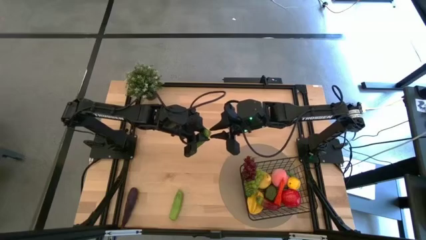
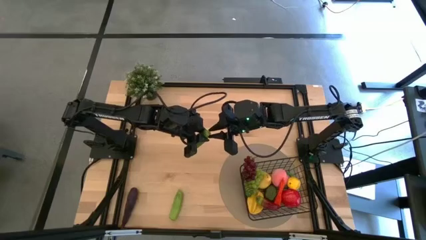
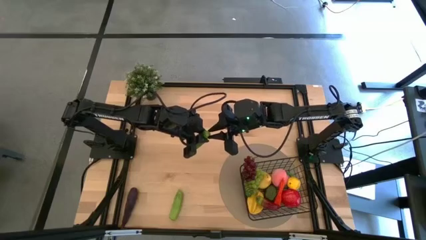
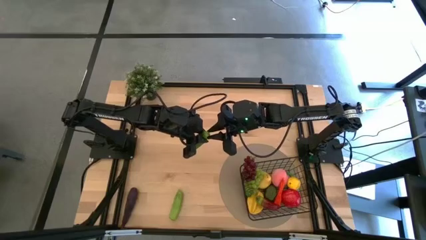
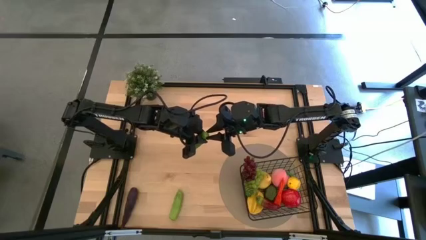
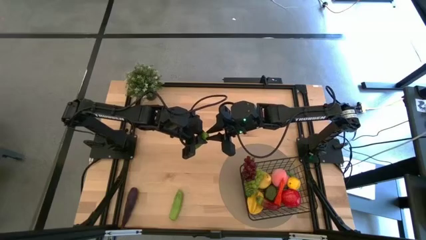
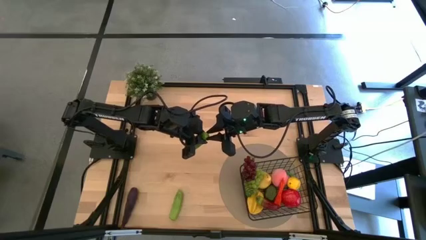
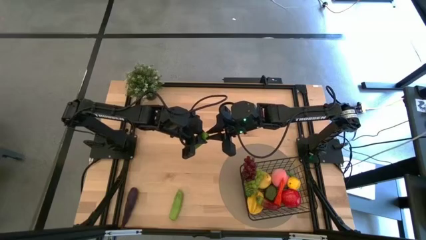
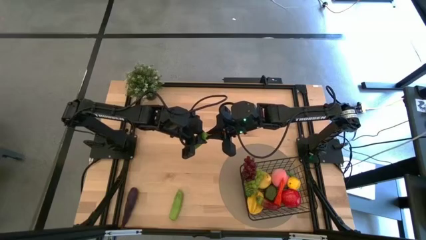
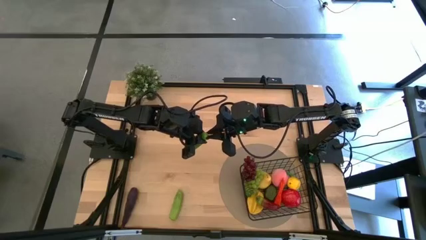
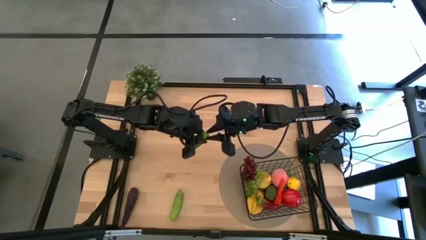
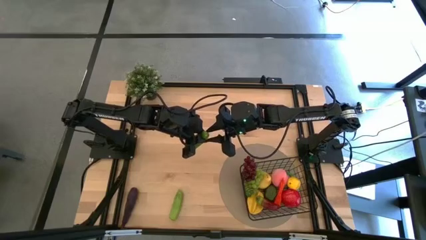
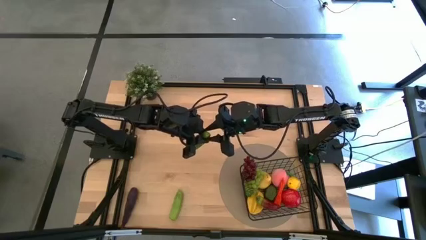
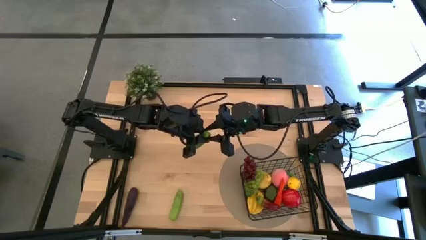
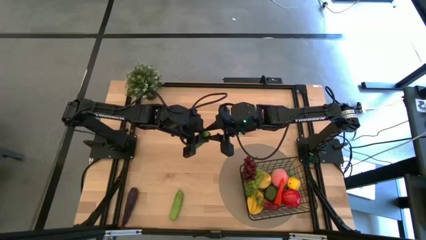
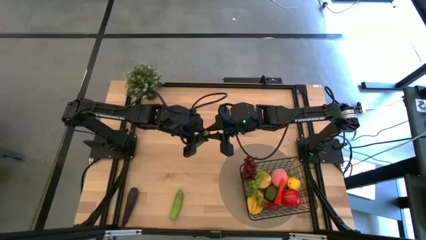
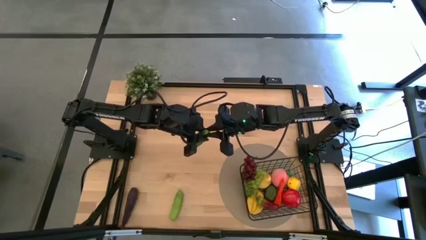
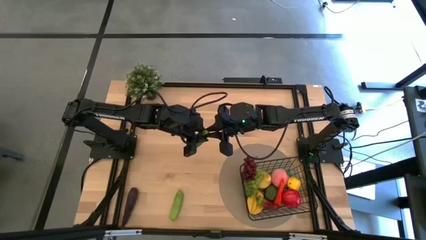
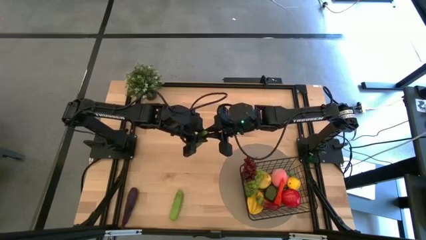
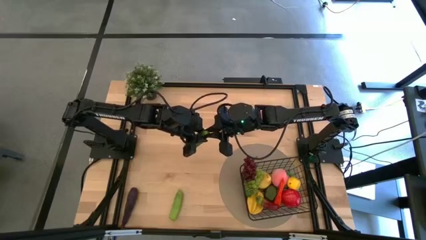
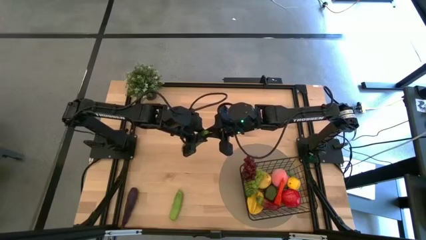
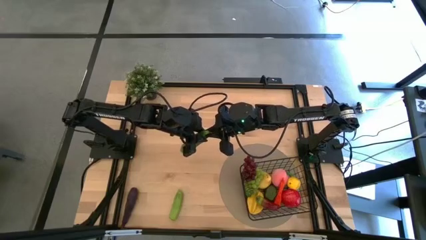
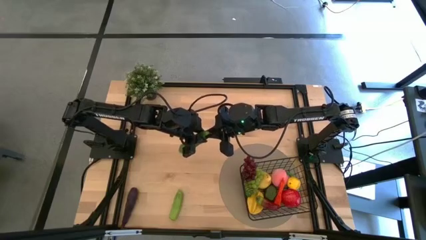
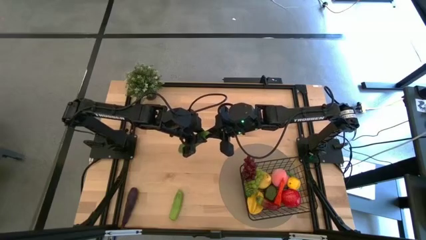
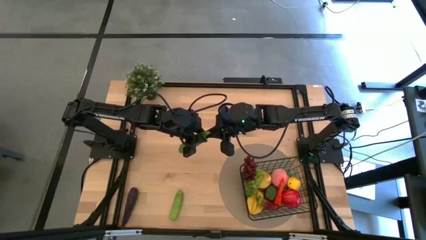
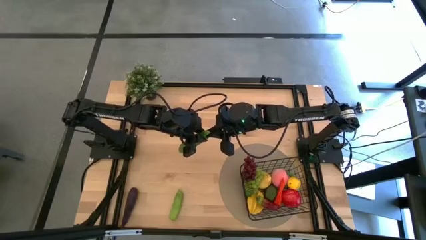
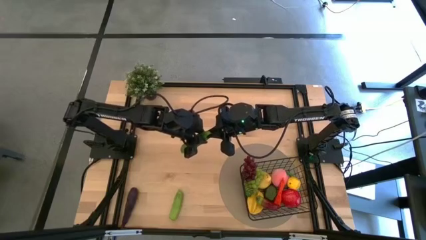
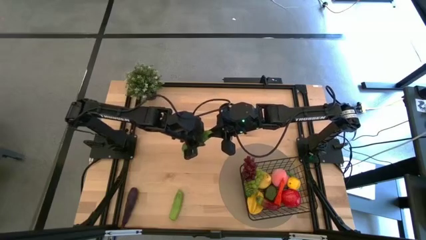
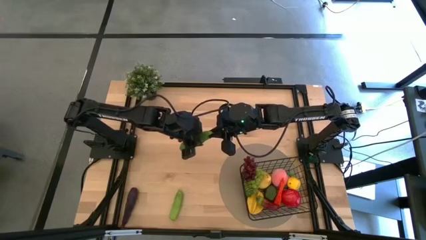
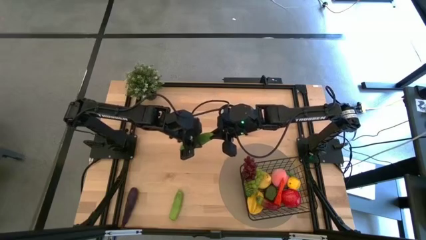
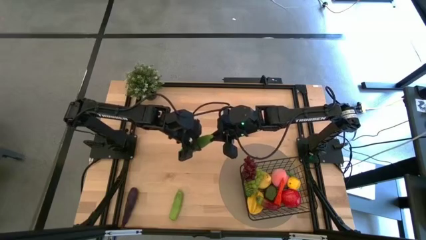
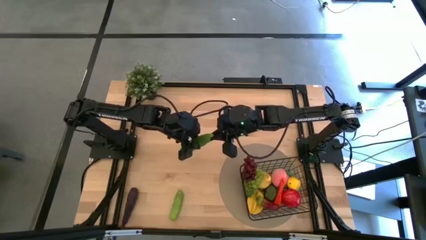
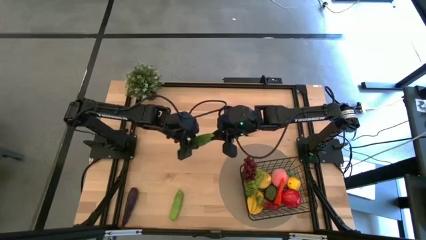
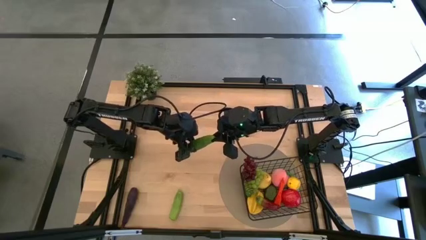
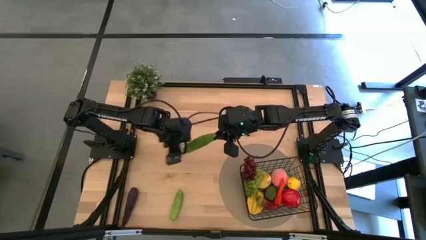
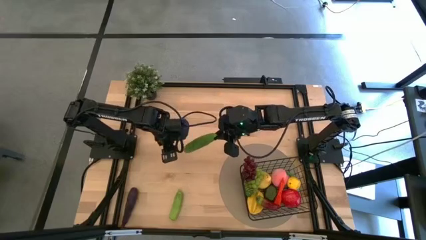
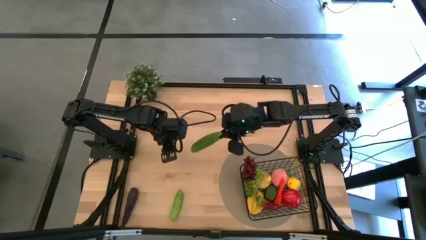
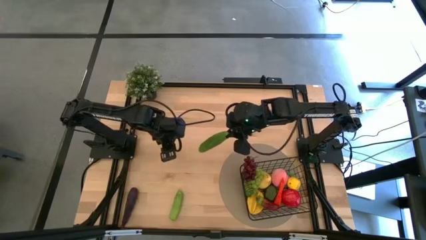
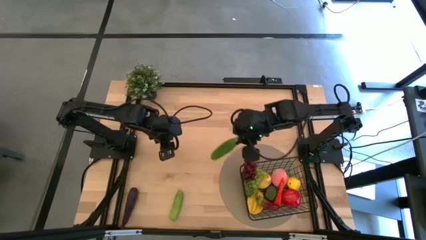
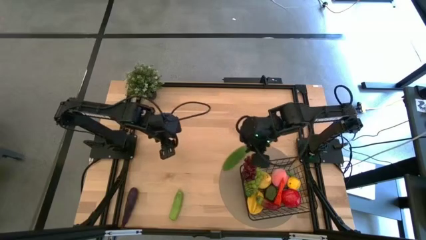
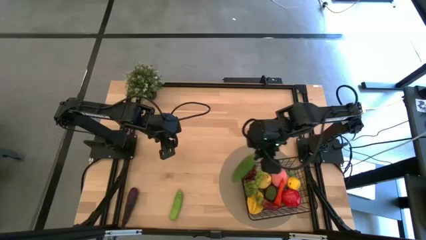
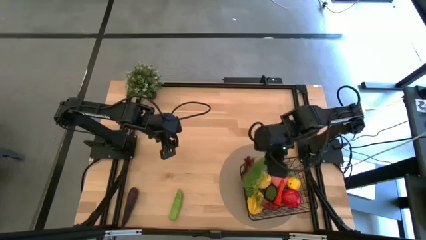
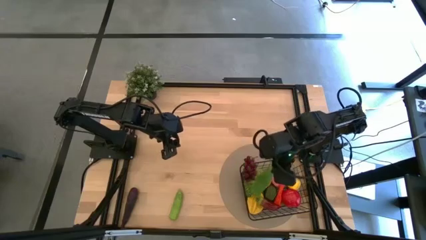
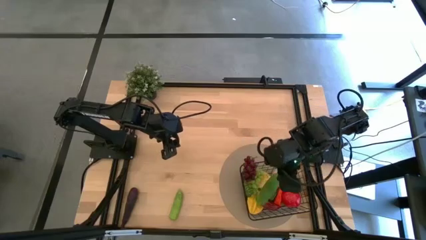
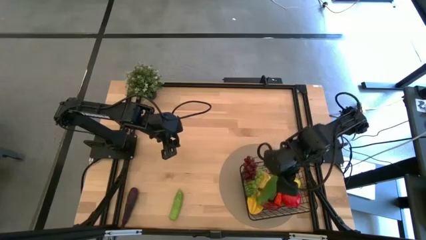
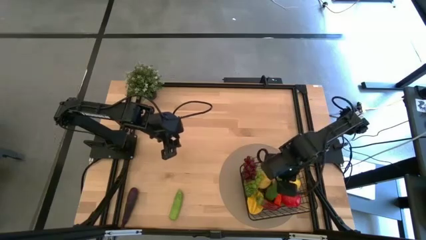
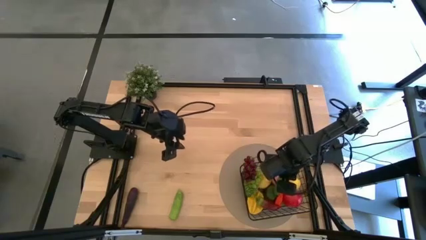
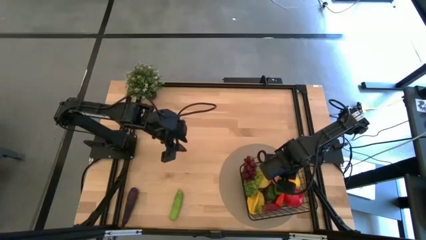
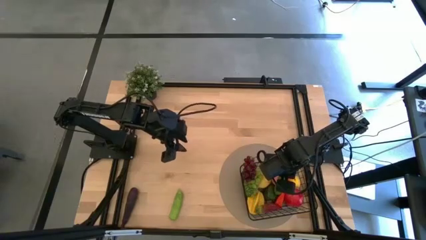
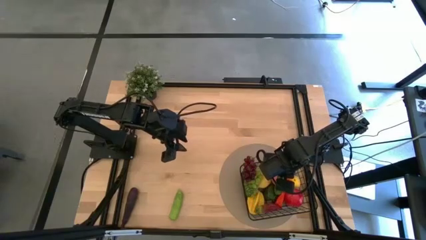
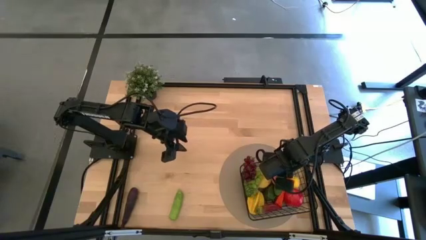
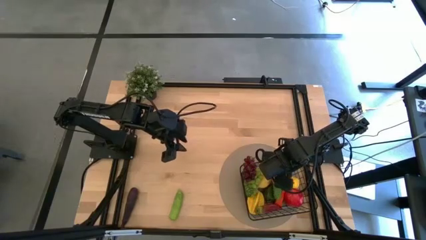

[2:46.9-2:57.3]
Task: Build produce basket
Put the cucumber into the wire basket

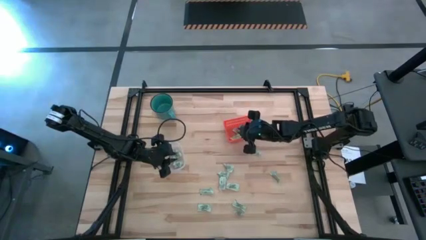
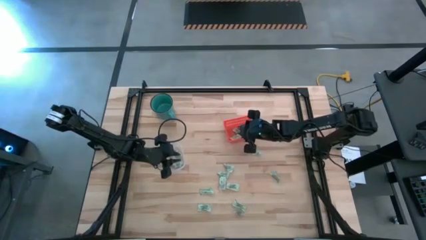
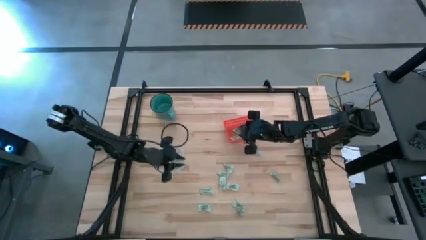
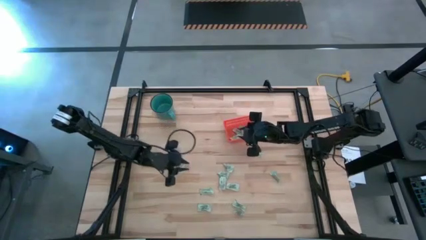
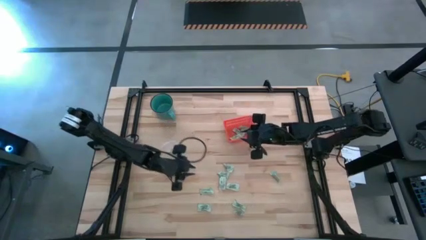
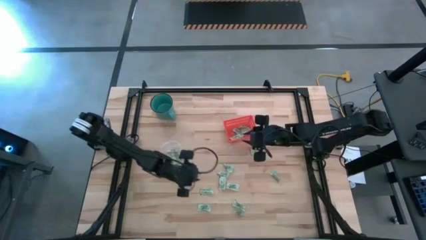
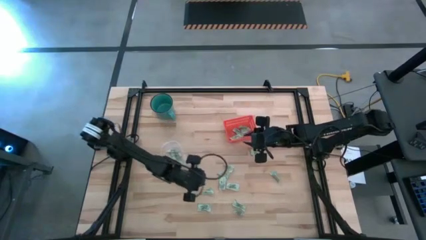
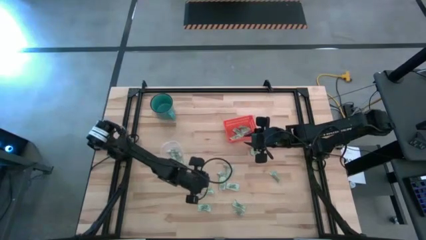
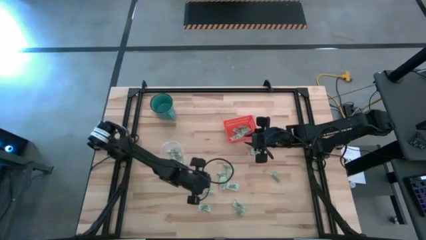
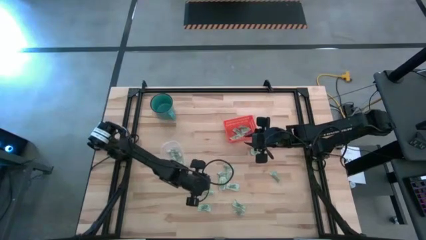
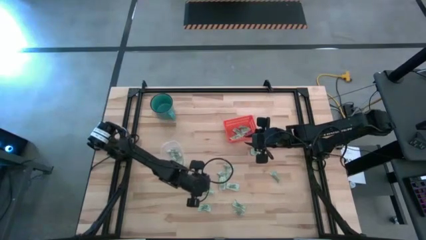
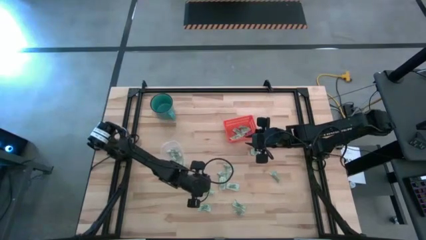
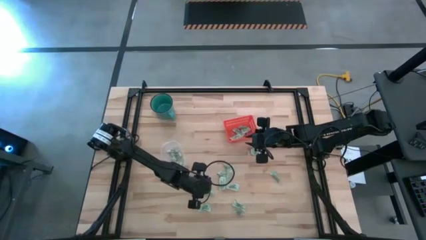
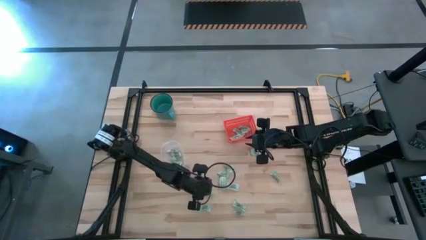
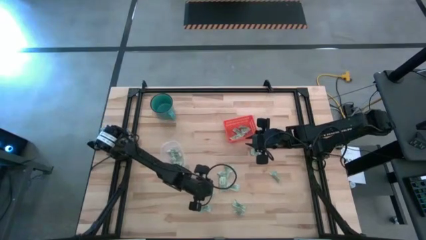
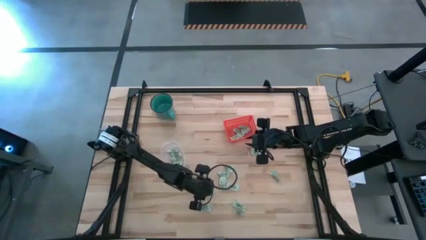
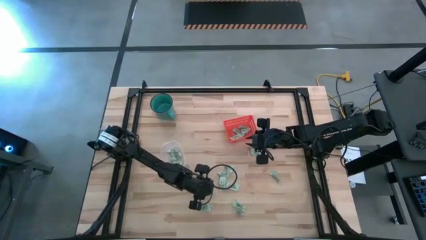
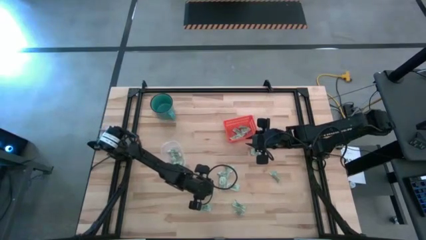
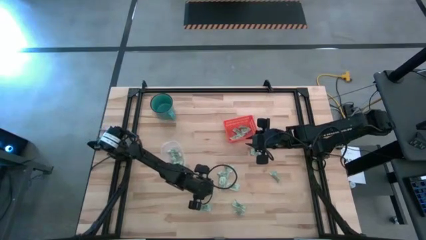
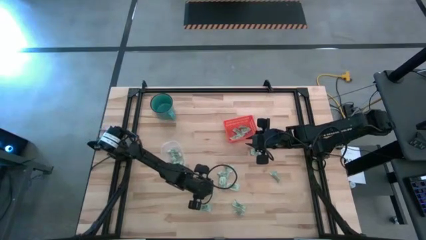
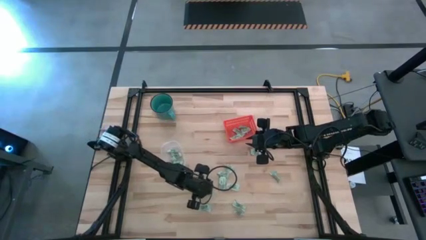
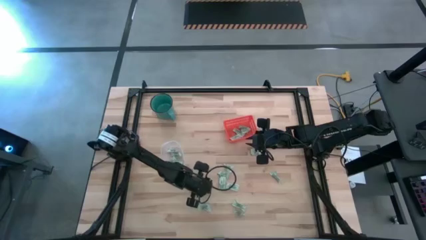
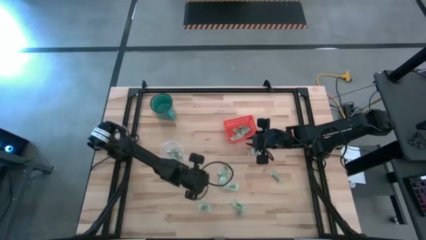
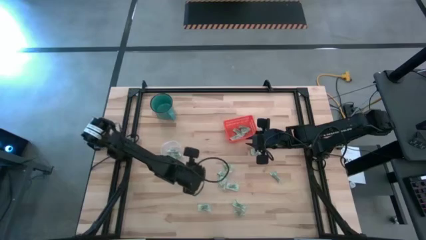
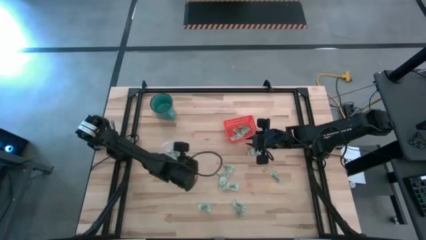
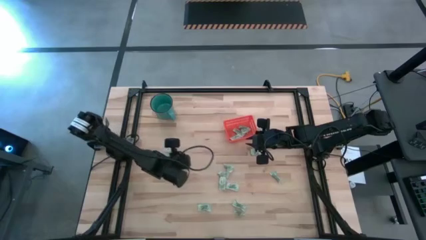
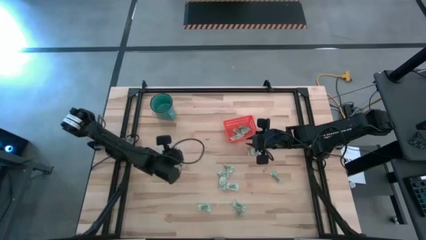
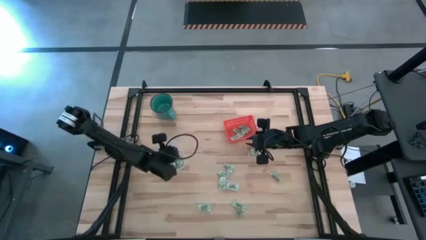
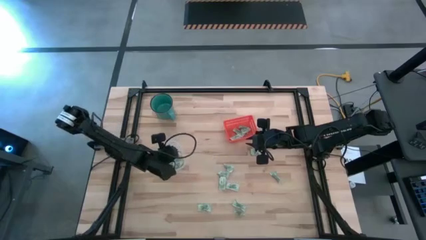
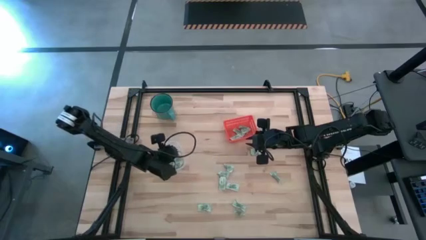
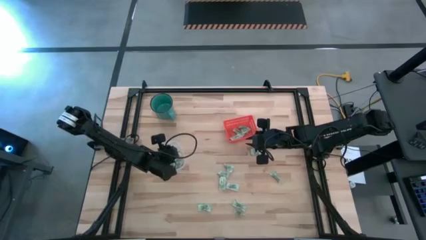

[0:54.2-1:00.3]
Task: Pick and place items into bin
Put the light green stevia packet into the transparent container
